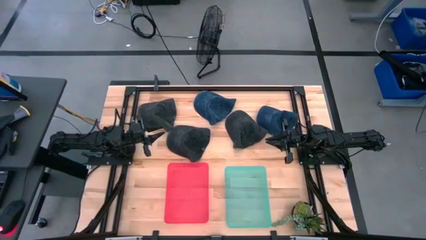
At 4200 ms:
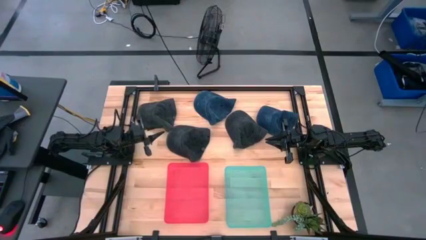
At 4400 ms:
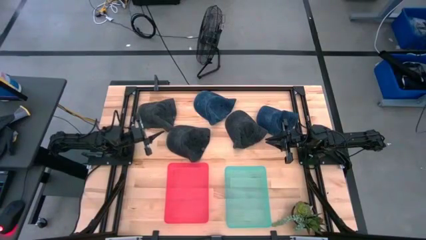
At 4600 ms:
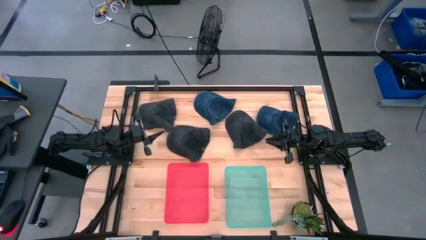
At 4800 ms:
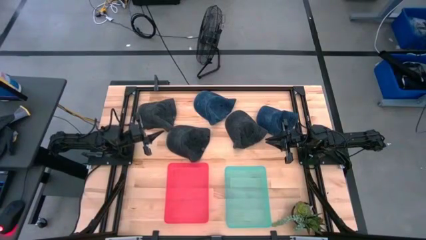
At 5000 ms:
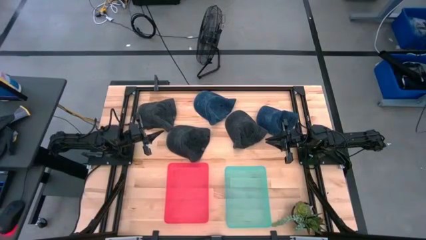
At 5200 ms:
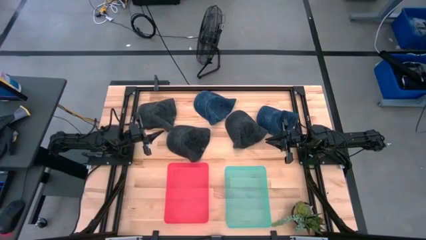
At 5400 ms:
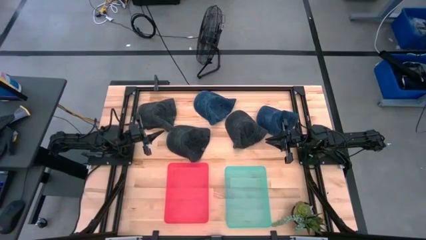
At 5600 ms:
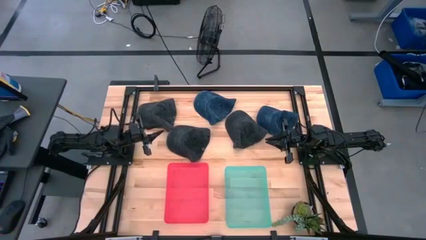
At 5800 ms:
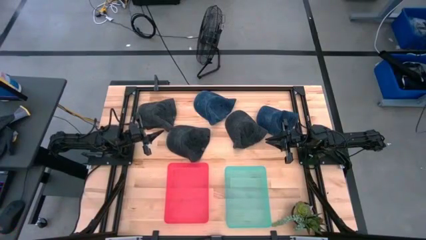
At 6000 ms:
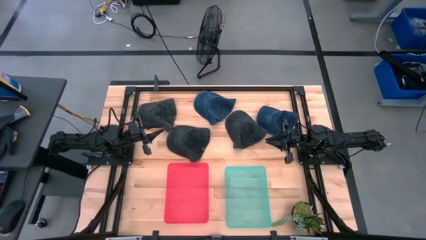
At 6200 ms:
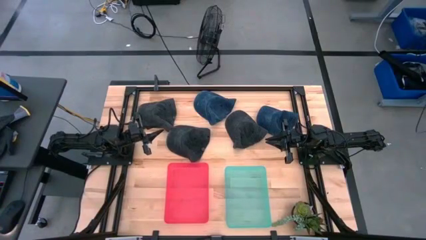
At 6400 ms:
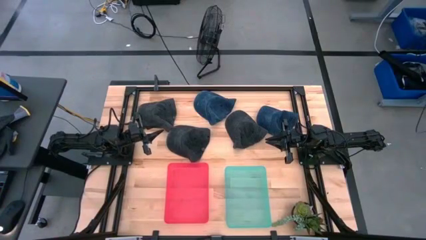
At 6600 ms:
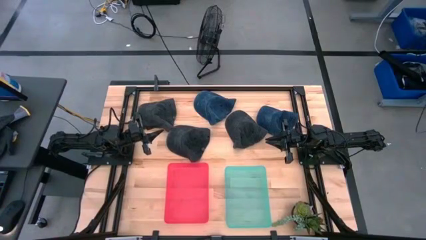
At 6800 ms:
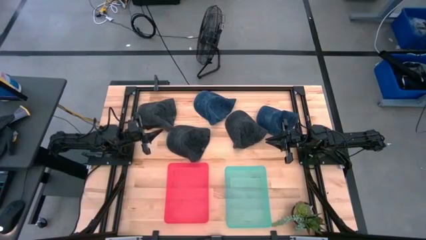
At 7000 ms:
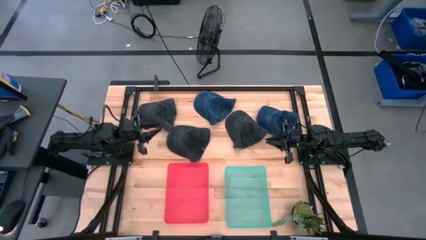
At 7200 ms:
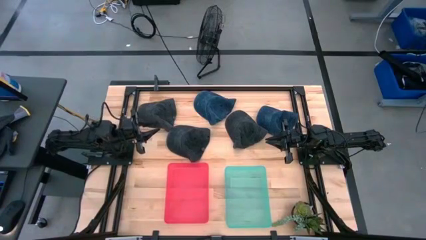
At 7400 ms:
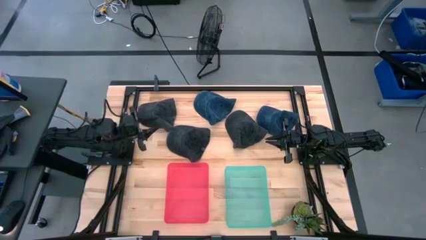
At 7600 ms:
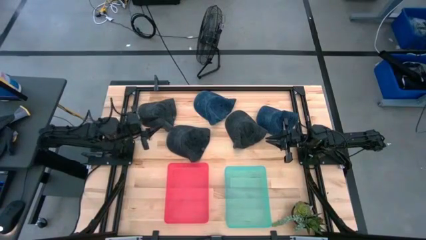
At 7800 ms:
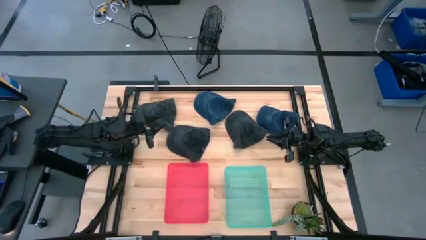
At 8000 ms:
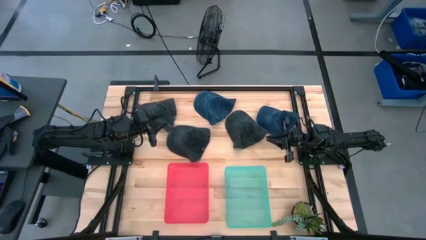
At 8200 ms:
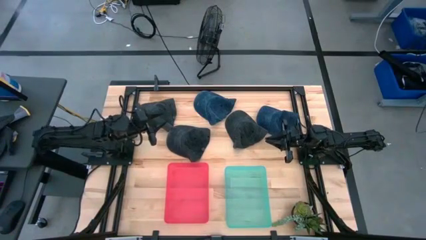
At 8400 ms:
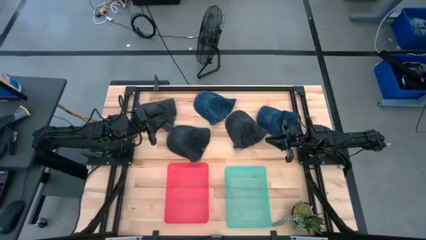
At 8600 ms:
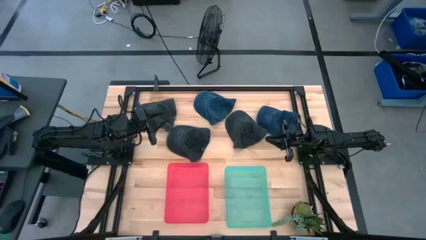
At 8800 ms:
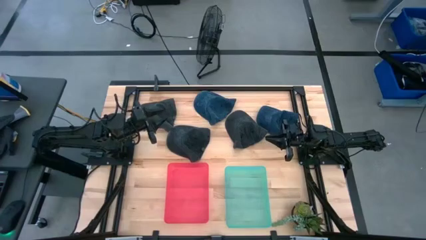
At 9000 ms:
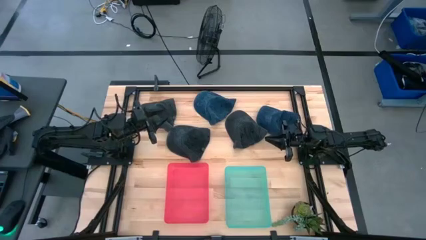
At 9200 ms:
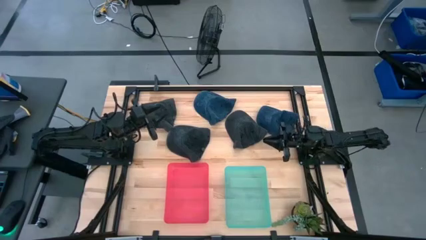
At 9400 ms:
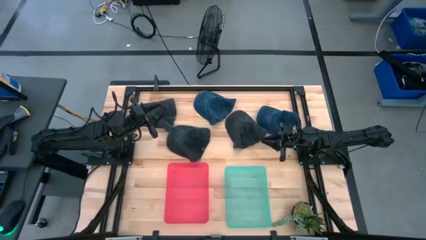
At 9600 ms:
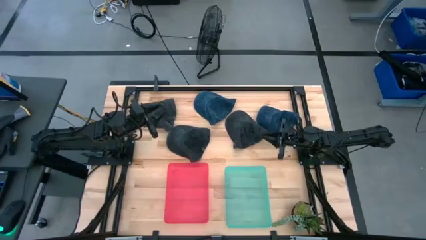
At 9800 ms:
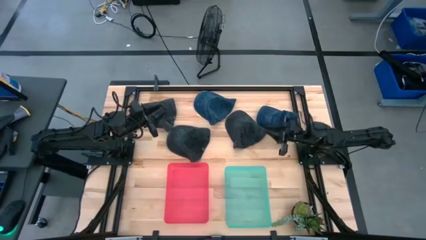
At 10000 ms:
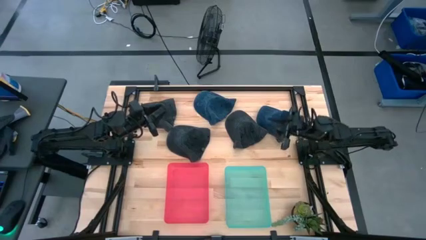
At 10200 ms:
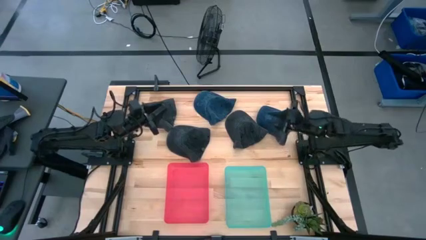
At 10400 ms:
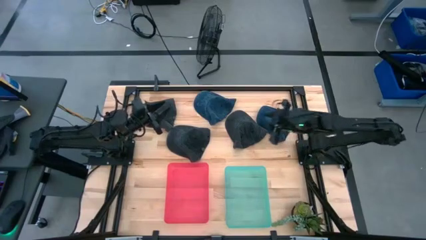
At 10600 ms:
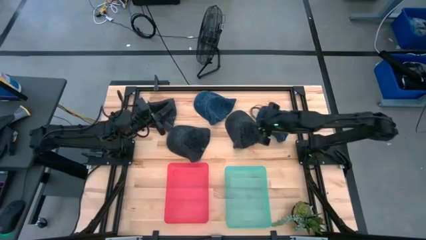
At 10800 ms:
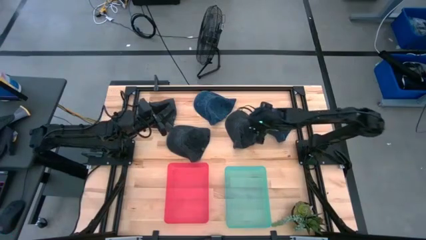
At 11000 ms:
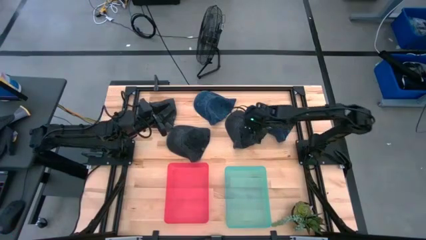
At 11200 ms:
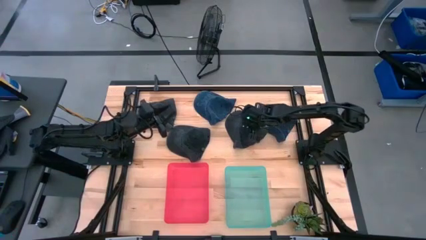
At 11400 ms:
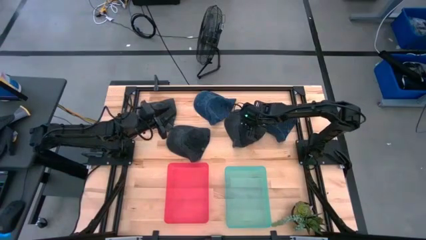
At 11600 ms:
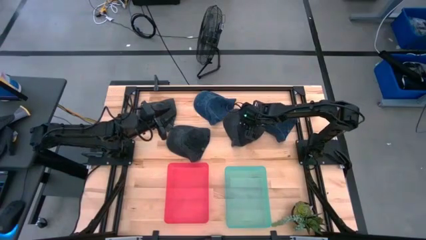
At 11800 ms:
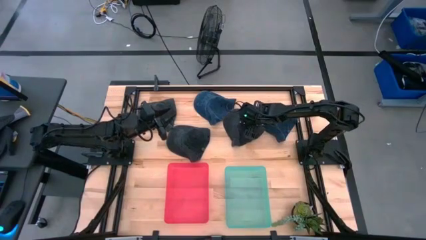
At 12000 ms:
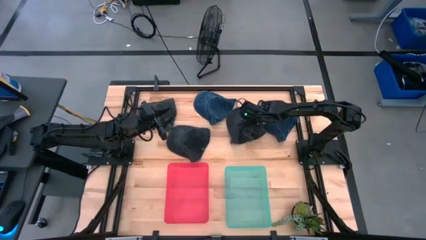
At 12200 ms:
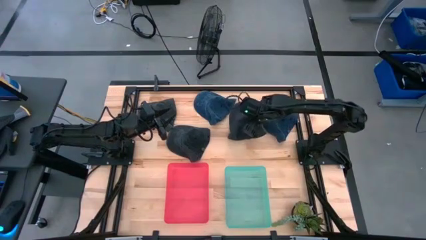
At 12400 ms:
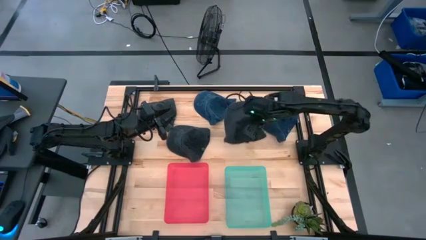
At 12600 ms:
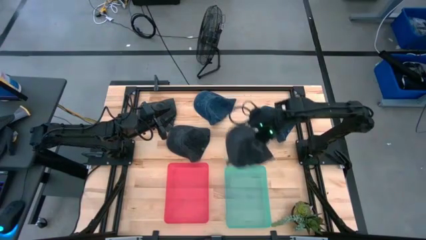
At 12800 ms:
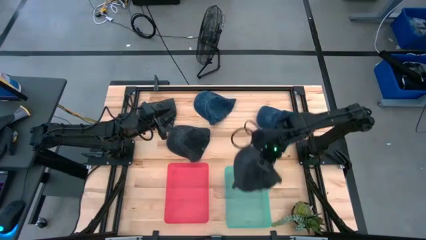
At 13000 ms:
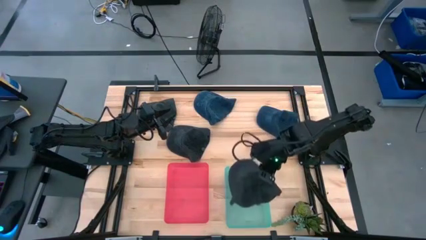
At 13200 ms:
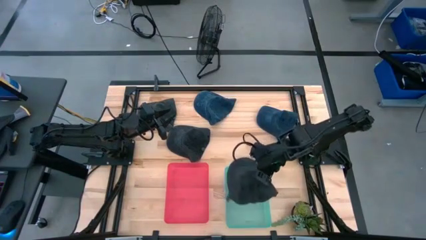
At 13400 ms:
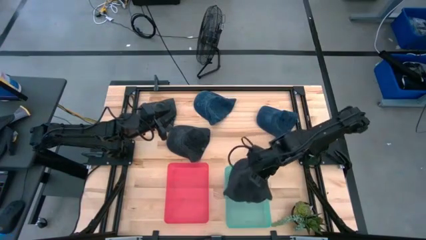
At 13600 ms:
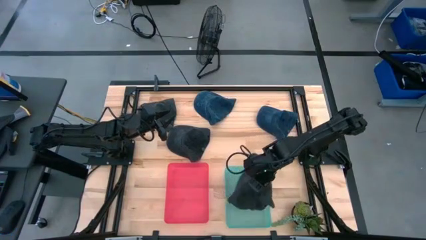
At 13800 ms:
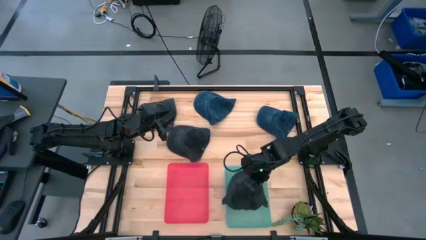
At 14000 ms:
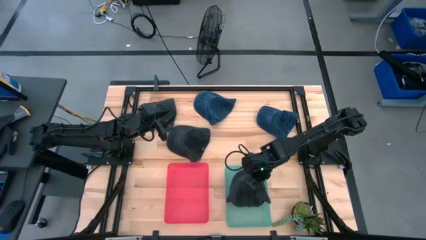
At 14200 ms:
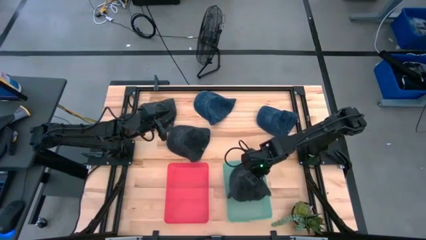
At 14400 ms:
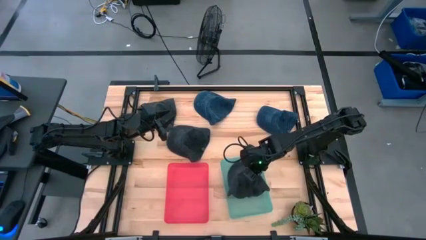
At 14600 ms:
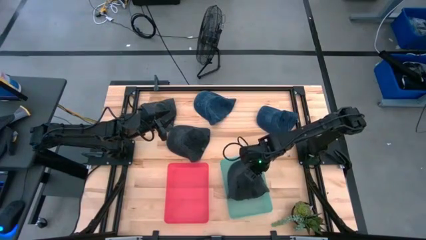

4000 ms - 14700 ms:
Task: Pick & Place hat
Put the right black cap into the green bin

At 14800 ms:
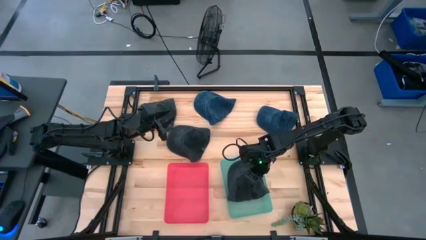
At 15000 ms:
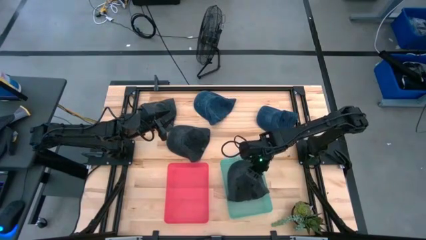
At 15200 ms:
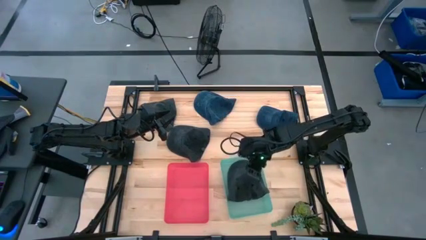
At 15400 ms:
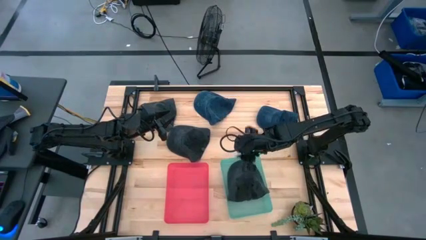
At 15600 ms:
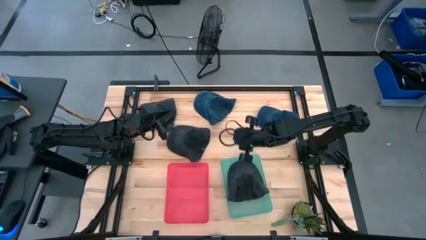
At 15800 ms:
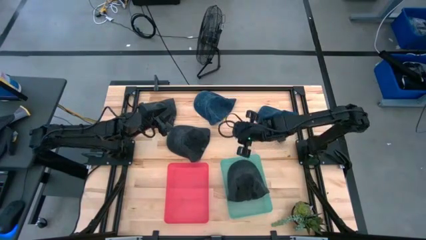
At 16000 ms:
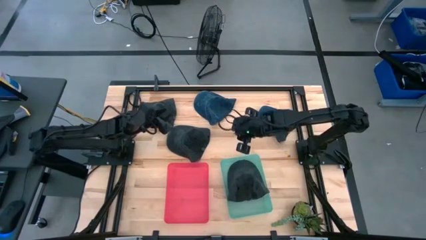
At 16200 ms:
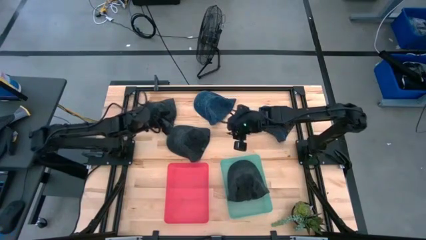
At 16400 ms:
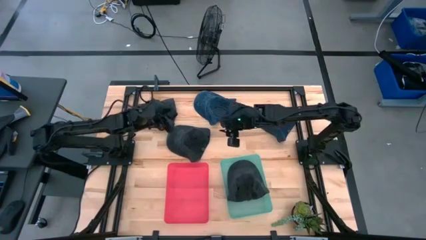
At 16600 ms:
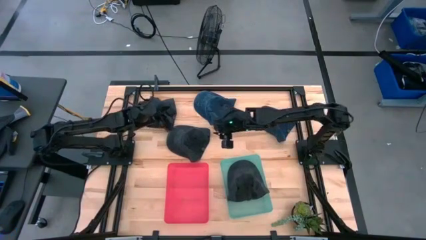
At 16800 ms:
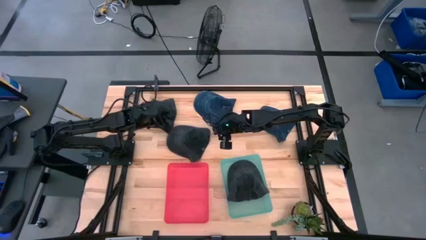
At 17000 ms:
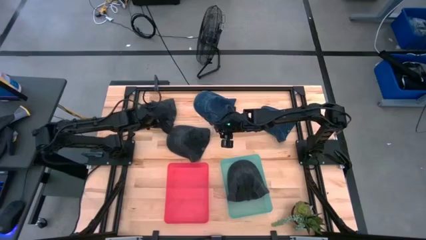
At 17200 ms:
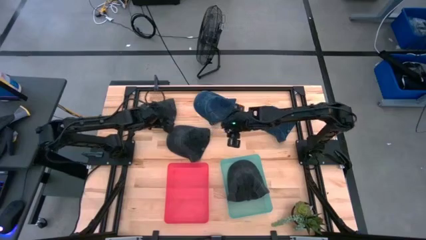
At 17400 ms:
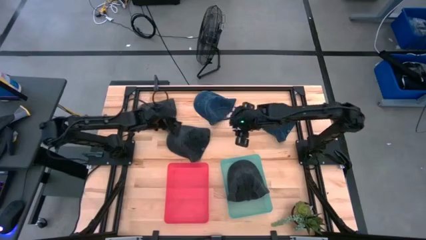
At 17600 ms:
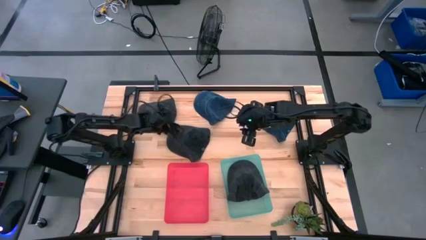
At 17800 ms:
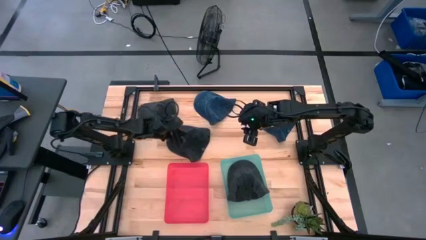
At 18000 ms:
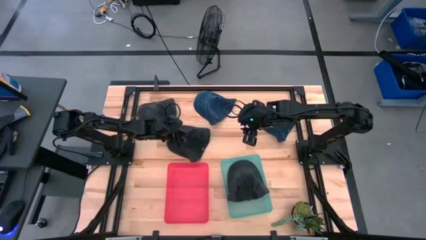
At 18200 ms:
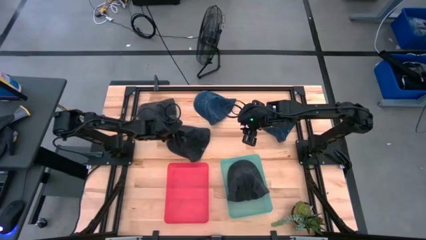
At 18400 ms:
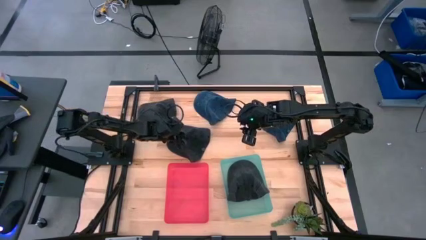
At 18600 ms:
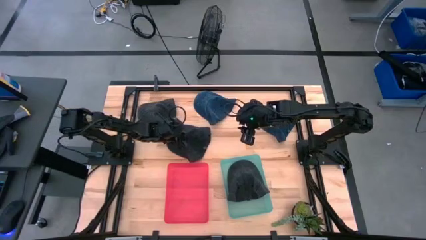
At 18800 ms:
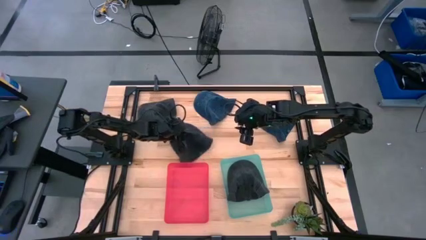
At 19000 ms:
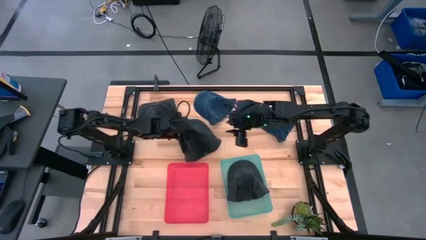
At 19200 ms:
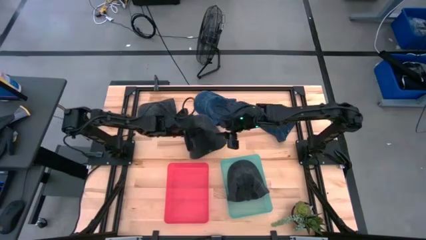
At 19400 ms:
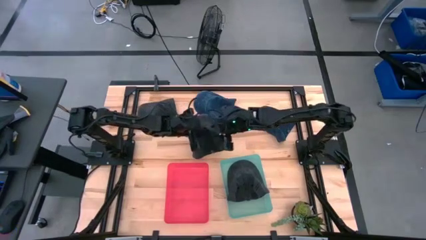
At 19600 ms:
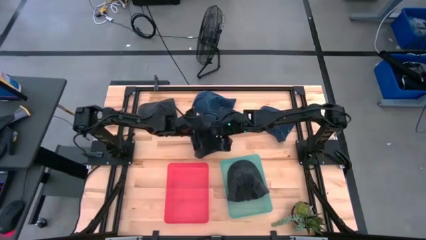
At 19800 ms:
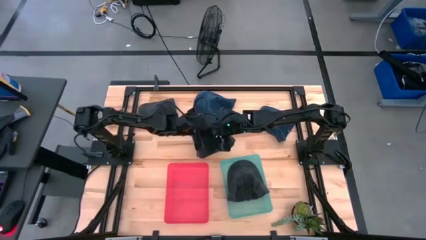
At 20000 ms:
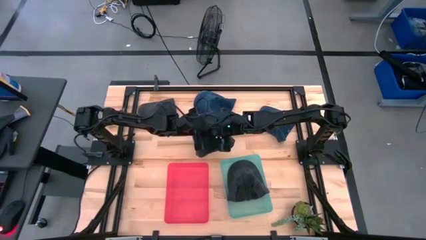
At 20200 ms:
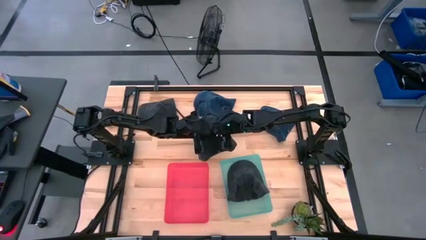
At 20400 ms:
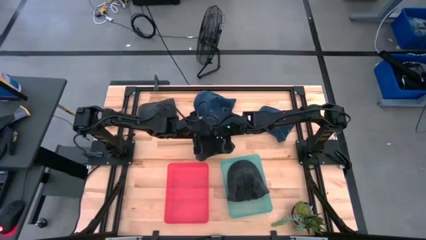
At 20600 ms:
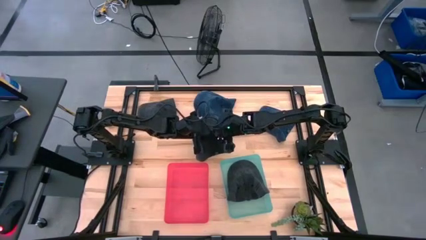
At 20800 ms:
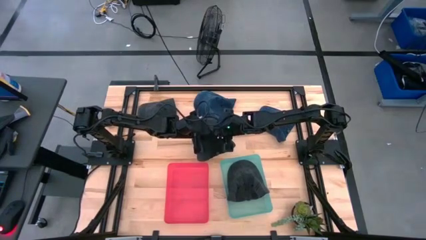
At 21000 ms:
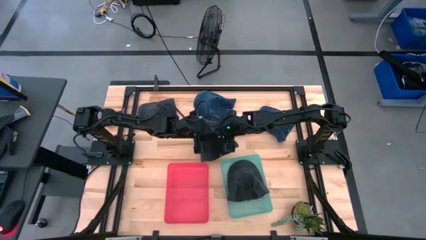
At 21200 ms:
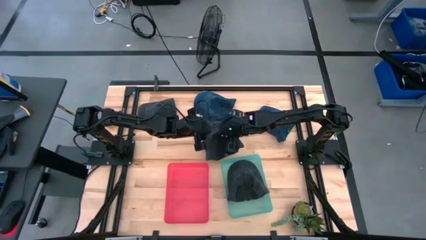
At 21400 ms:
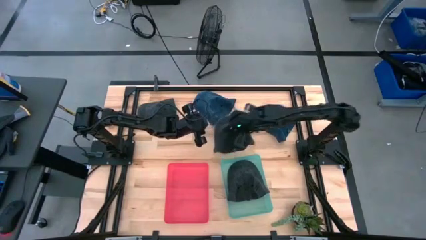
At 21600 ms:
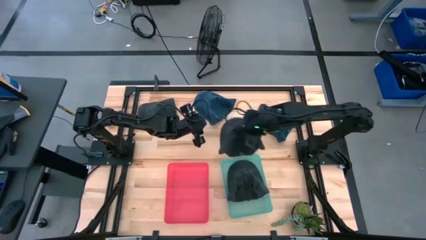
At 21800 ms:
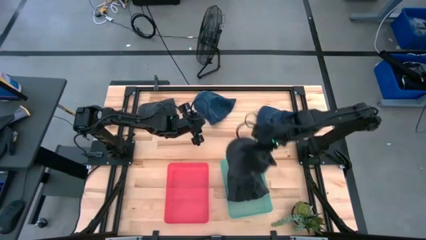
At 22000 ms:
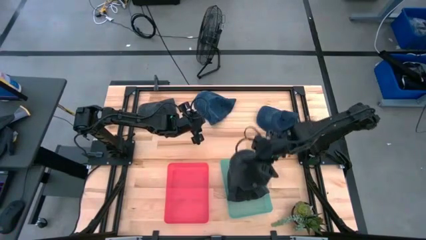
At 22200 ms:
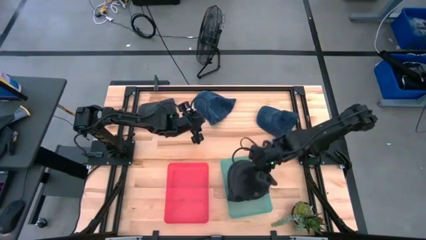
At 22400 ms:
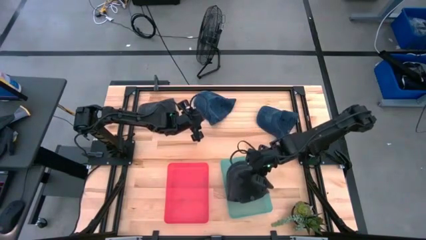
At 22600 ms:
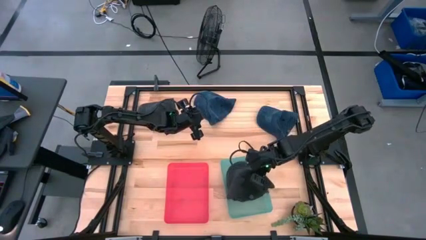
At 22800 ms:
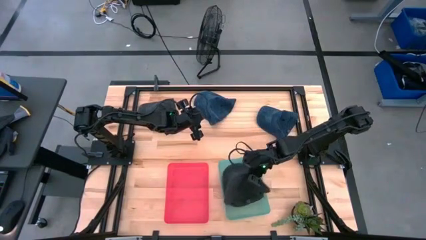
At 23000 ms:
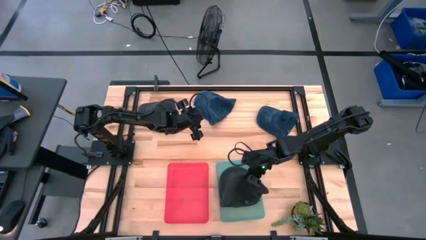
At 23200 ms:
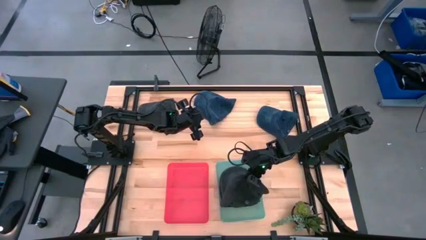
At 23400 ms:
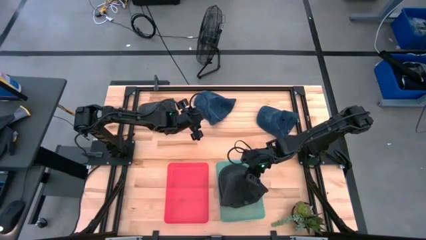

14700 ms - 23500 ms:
Put the bottom black cap into the green bin
